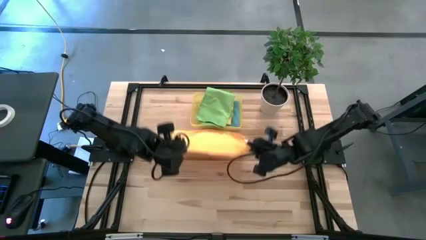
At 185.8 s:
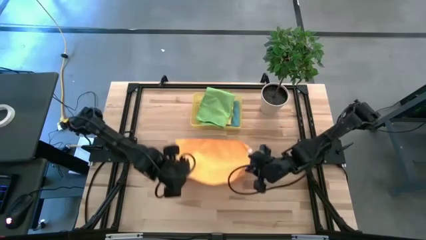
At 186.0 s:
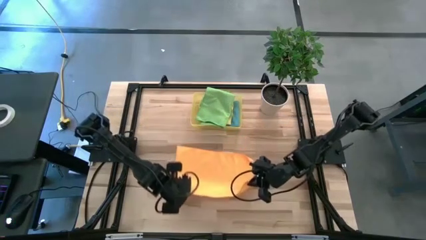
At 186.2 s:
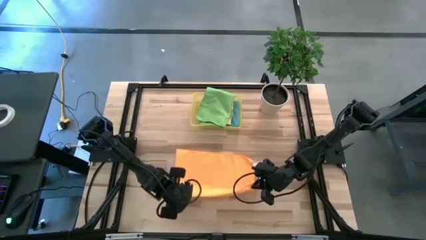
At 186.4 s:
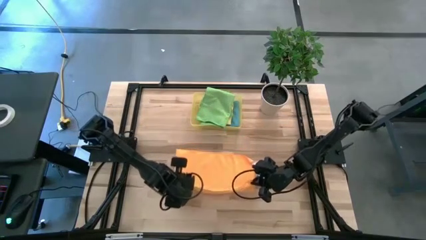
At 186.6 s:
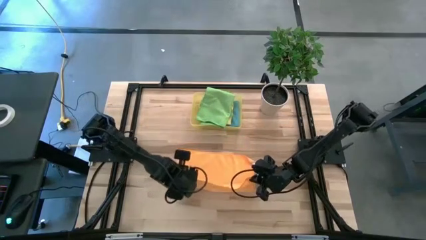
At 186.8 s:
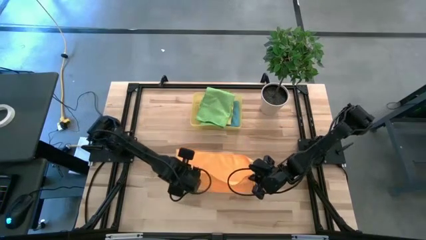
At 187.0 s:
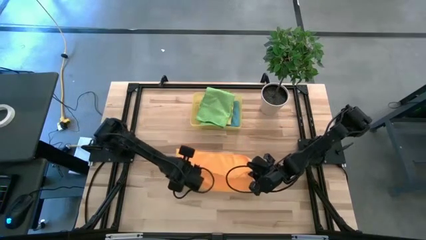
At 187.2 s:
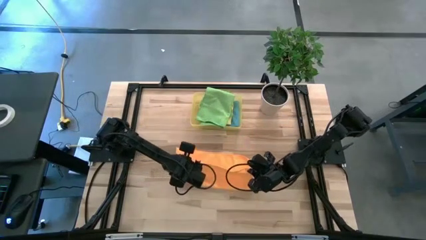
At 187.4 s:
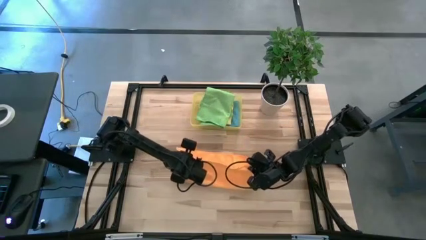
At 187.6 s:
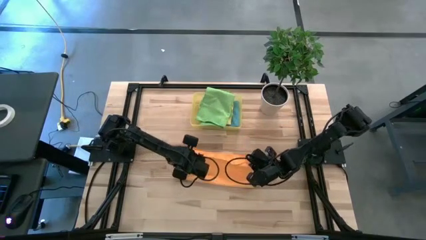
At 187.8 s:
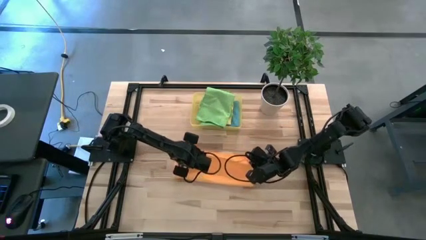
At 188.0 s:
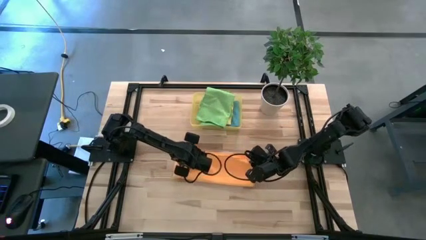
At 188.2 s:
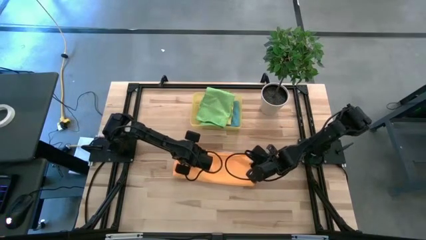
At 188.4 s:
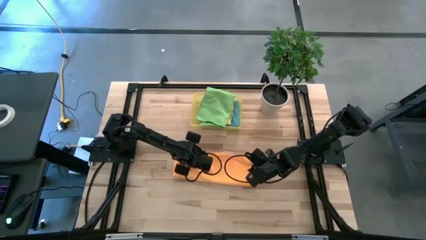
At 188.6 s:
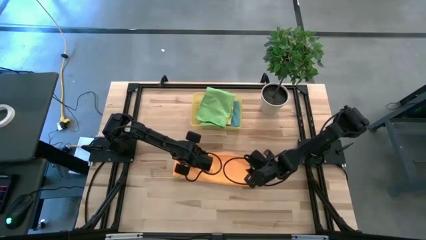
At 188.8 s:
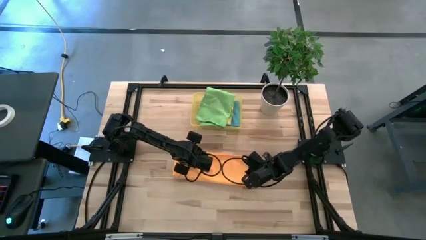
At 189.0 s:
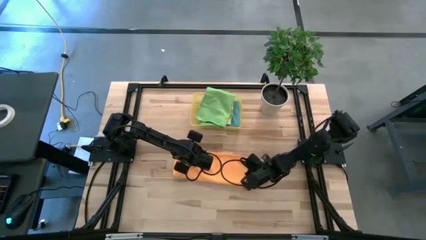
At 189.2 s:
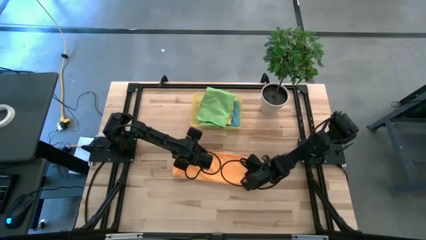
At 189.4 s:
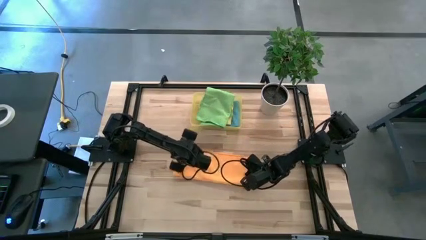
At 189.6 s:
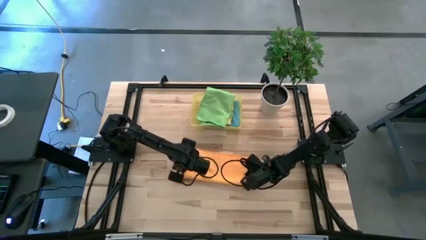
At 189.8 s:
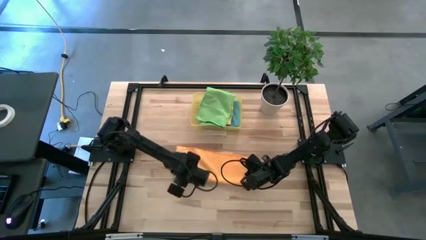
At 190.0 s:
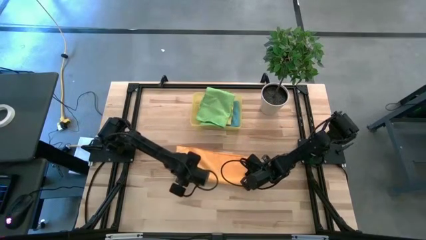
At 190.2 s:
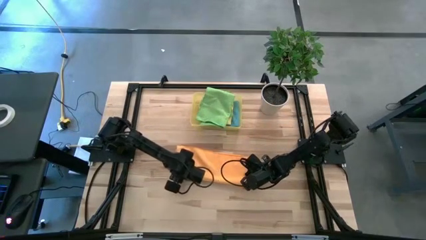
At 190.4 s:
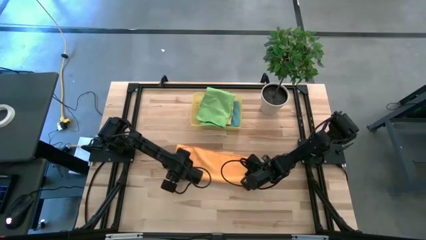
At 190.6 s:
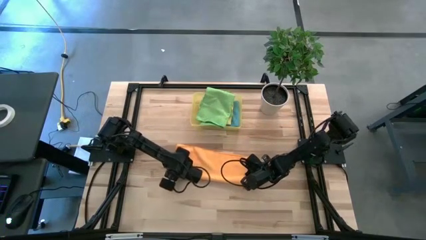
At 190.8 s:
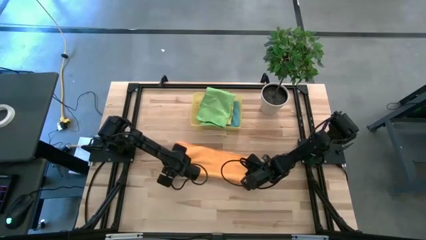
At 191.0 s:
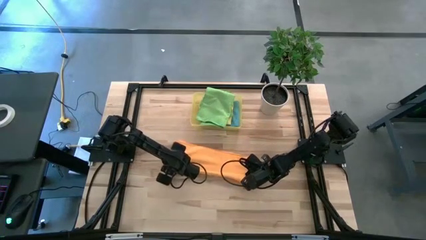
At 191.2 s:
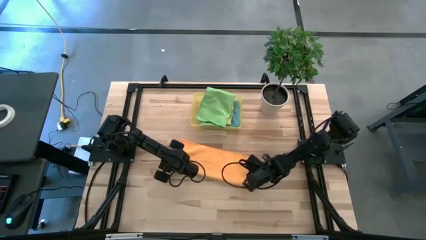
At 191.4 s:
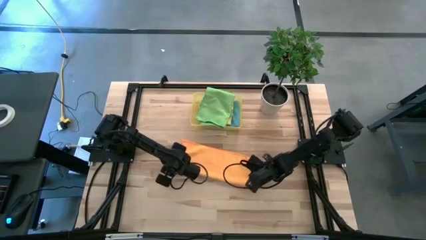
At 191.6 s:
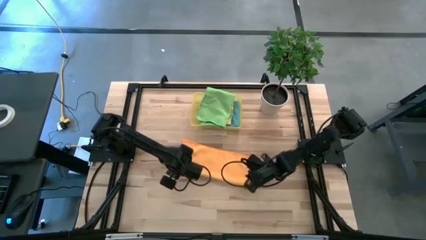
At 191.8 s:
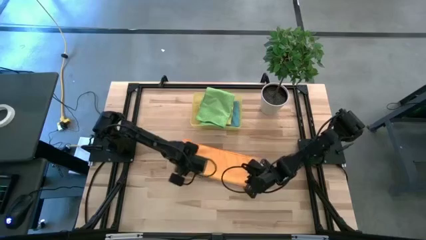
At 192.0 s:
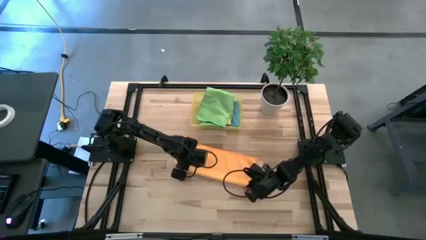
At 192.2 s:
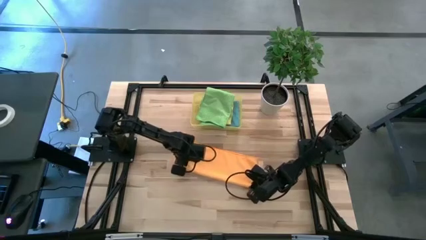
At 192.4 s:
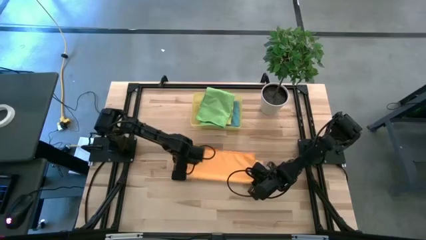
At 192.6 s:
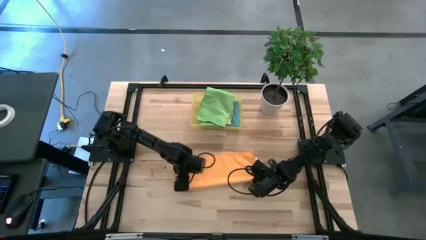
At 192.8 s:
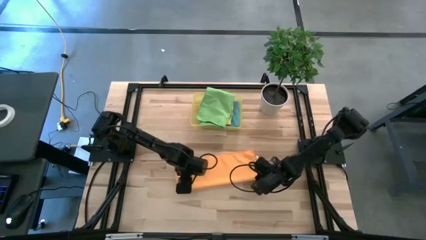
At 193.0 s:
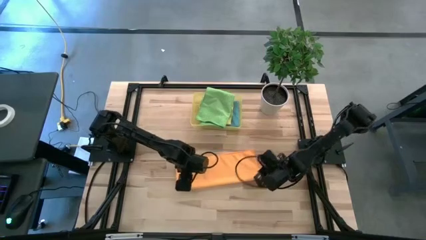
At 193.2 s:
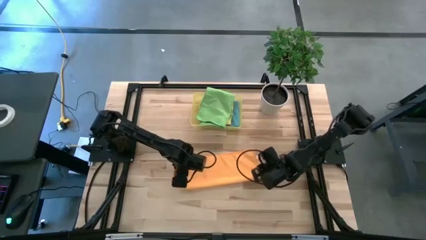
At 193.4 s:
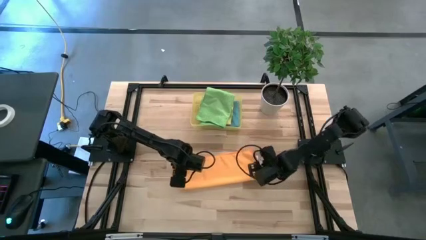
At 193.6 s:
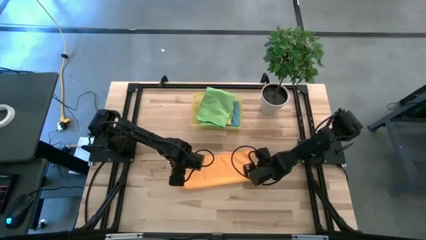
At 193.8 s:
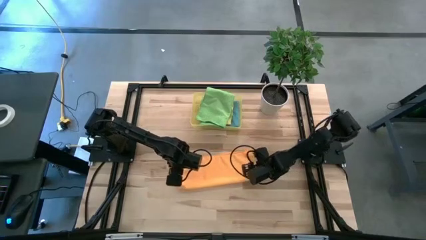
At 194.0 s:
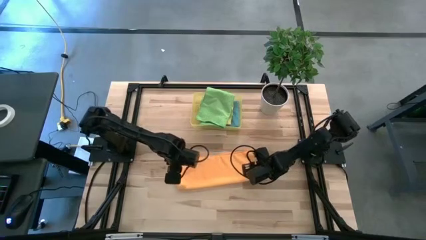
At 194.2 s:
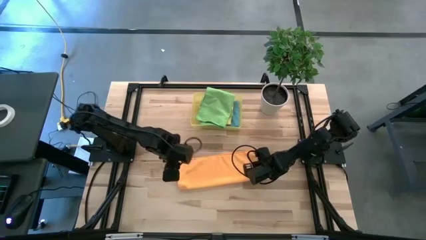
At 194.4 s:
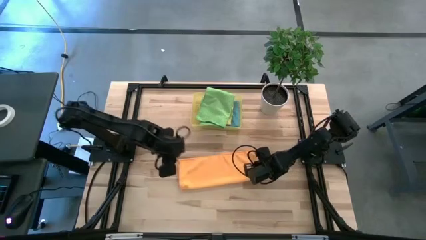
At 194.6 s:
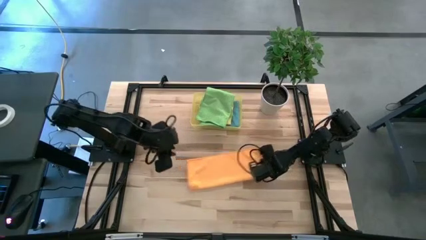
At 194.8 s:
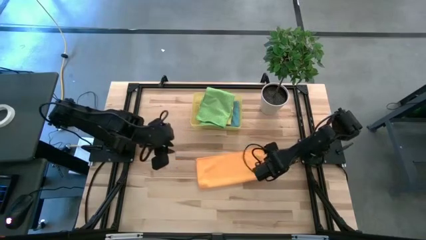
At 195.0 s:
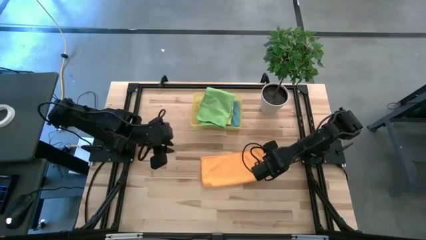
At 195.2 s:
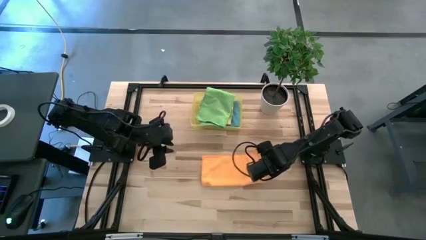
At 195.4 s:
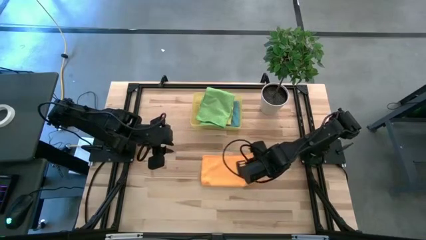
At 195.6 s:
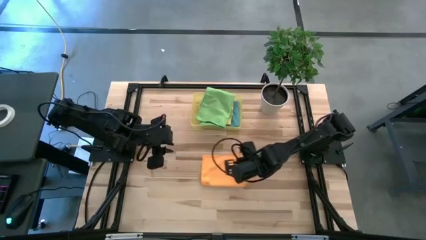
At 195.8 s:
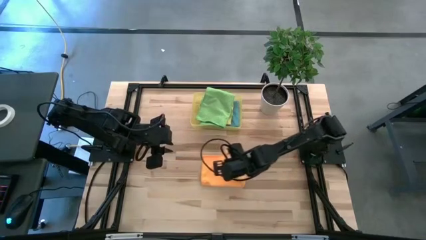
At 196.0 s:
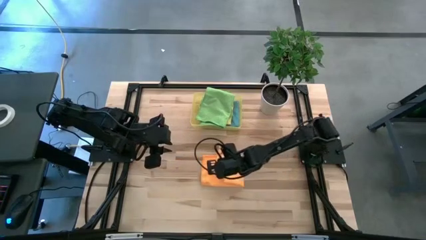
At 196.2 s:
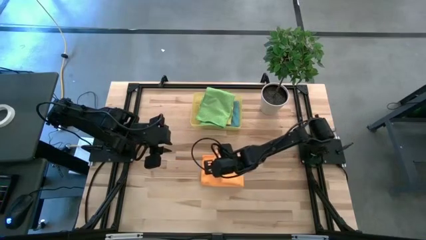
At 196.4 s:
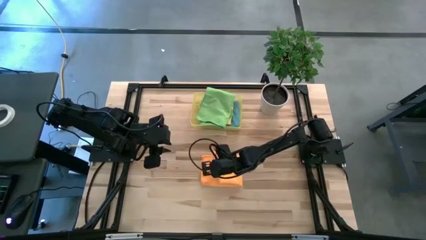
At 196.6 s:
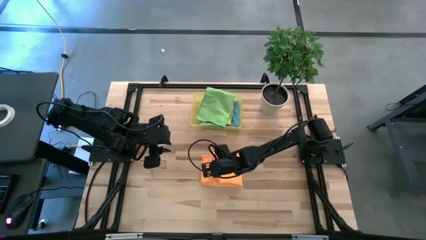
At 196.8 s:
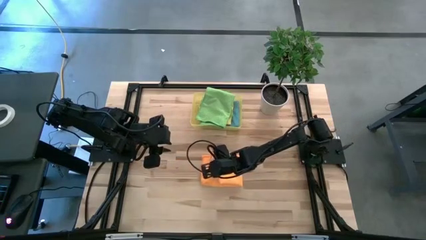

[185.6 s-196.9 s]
Task: Fold microfiber towels
Fold the orange microfiber cloth

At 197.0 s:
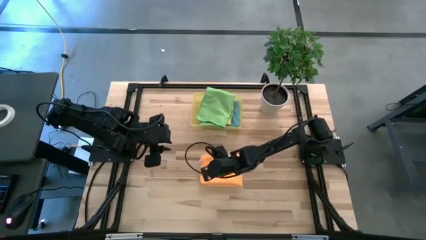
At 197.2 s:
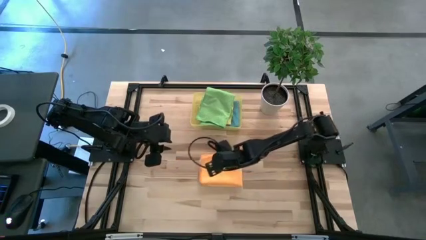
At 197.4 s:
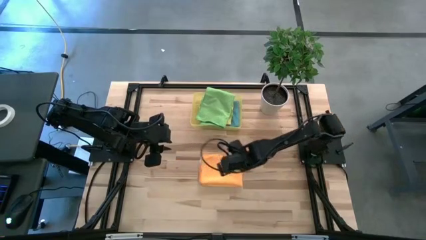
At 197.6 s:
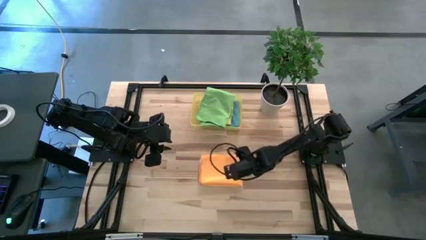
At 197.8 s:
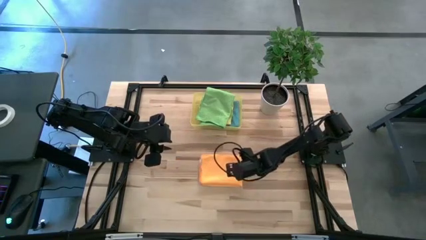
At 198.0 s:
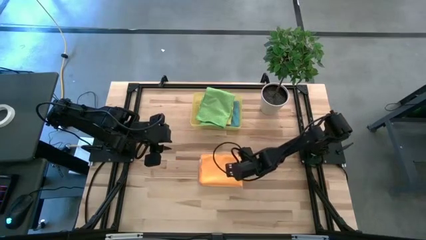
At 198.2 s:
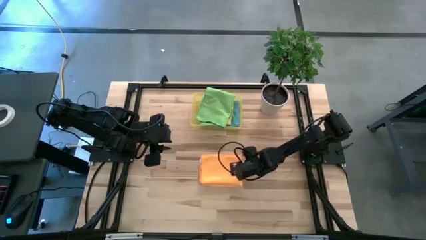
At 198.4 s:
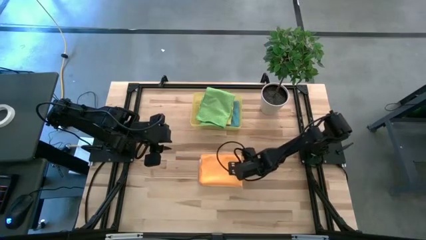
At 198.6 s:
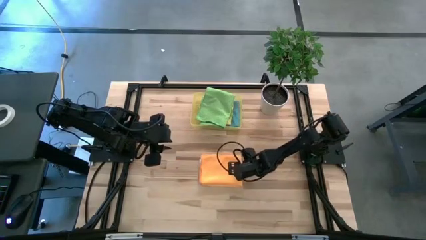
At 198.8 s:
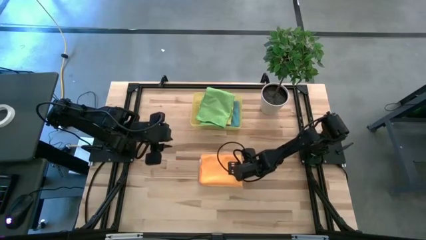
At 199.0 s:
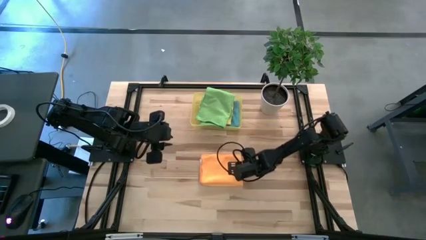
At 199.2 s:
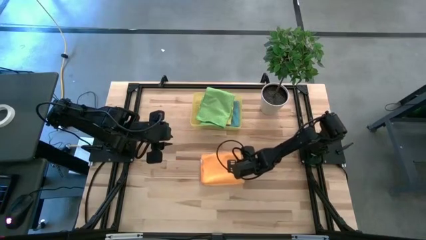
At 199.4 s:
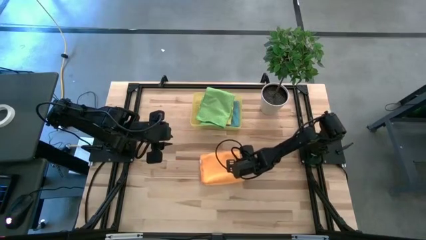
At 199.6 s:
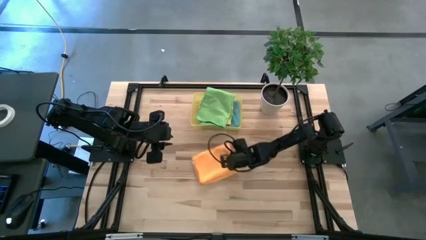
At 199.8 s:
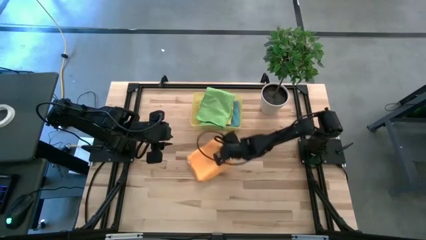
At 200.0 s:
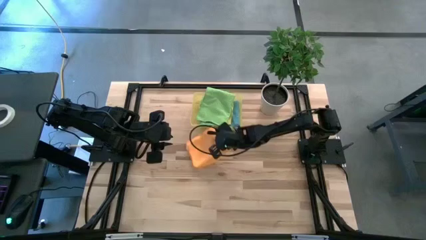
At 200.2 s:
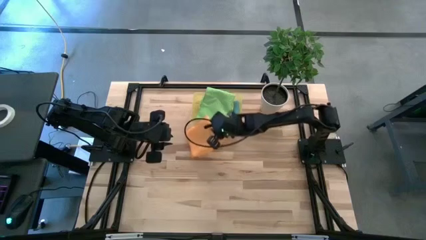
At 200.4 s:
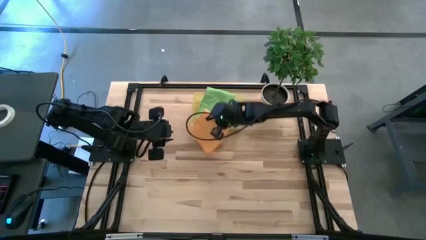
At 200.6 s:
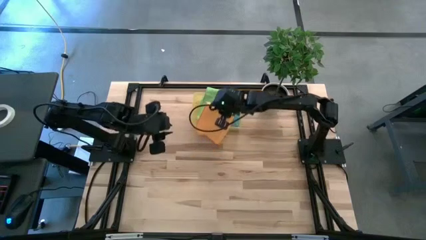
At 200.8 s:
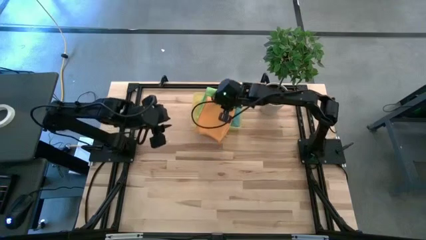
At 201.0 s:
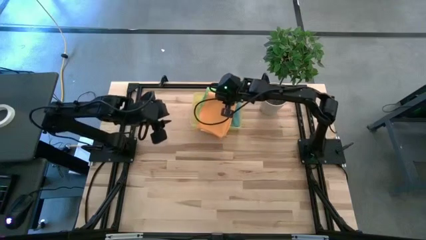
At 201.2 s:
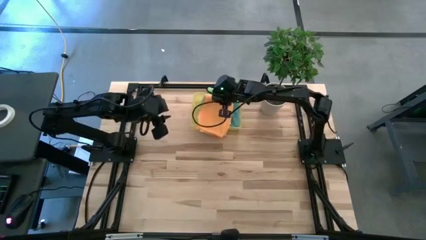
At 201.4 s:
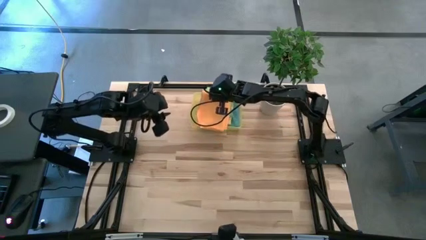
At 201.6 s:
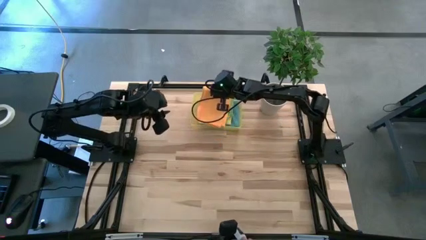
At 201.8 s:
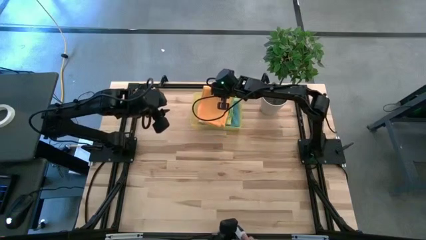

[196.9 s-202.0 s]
Put the folded orange microfiber cloth into the yellow bin
